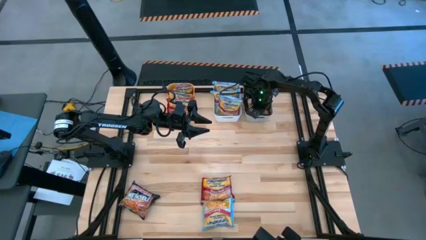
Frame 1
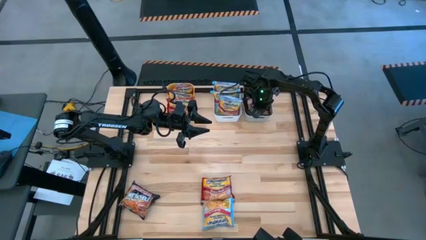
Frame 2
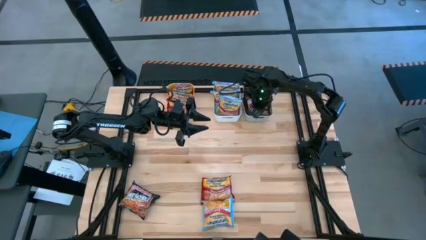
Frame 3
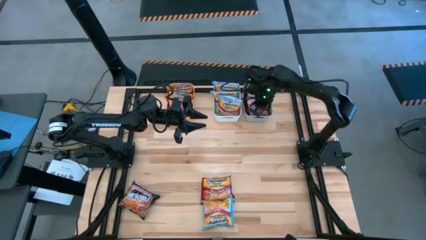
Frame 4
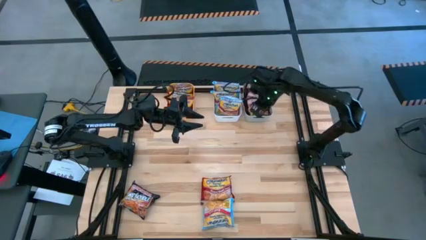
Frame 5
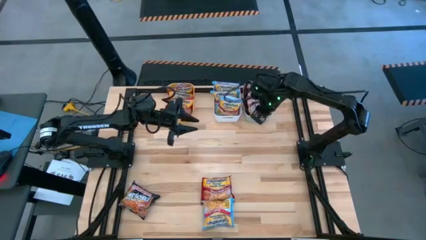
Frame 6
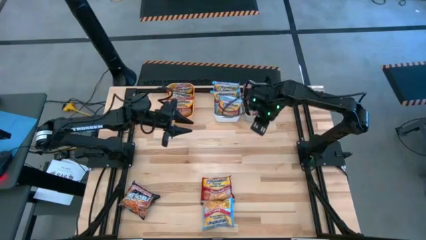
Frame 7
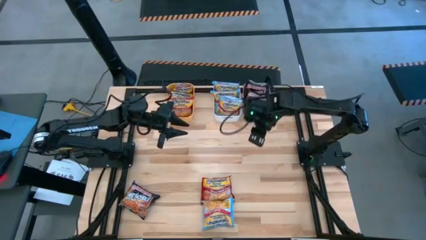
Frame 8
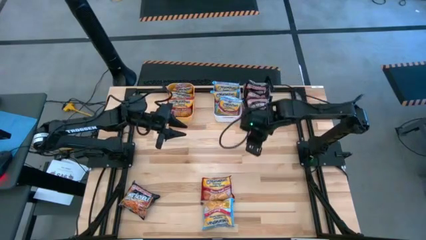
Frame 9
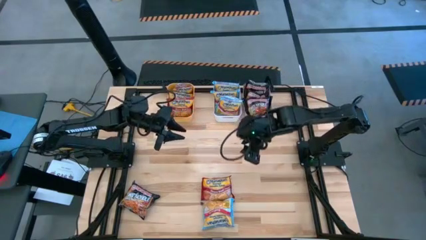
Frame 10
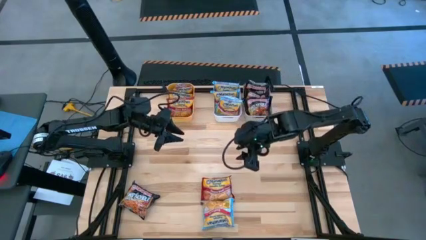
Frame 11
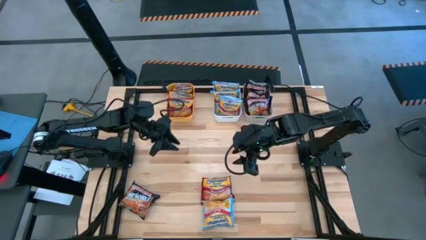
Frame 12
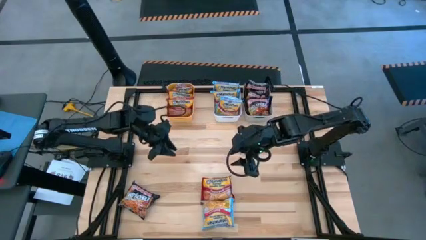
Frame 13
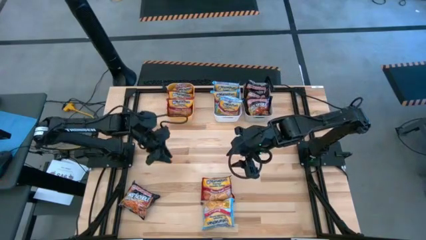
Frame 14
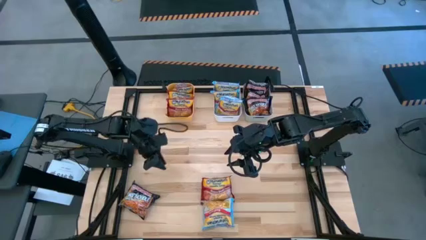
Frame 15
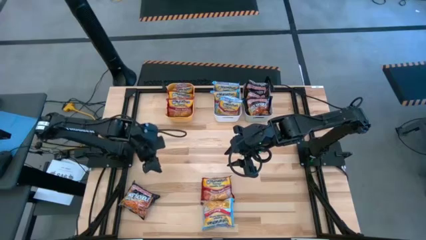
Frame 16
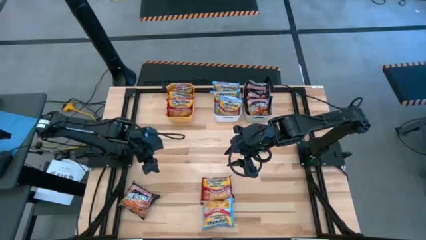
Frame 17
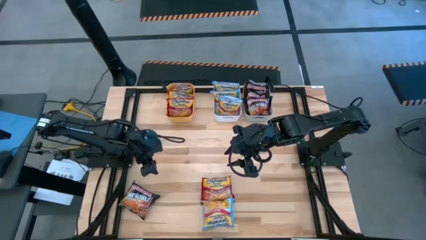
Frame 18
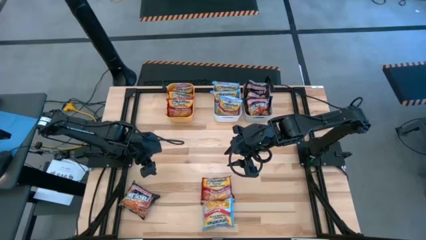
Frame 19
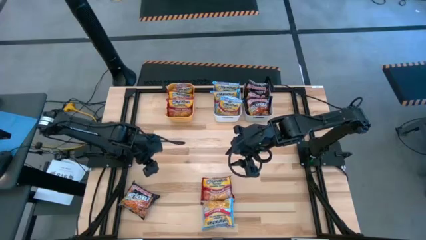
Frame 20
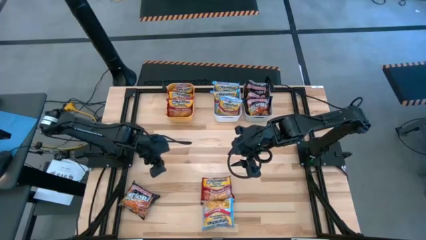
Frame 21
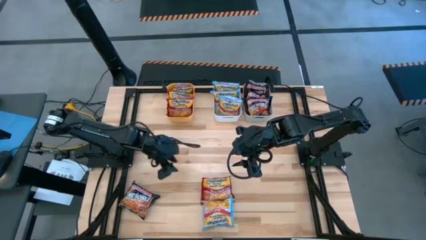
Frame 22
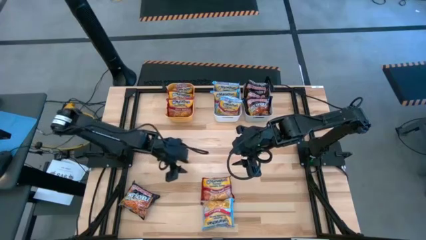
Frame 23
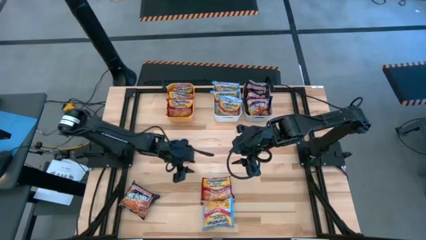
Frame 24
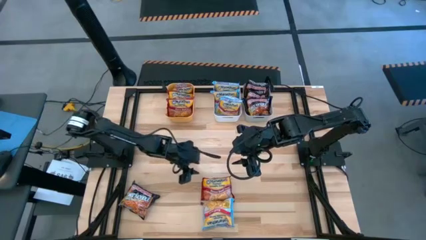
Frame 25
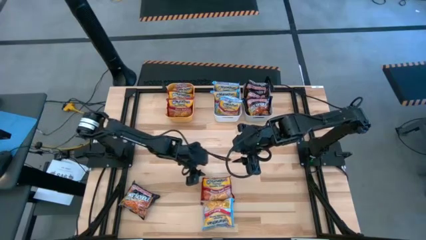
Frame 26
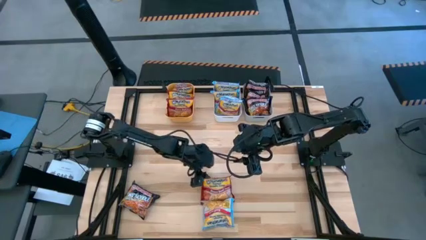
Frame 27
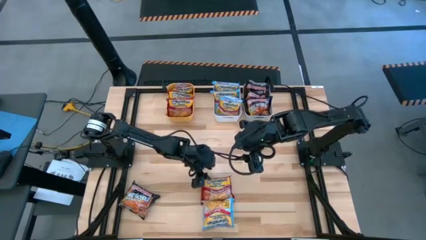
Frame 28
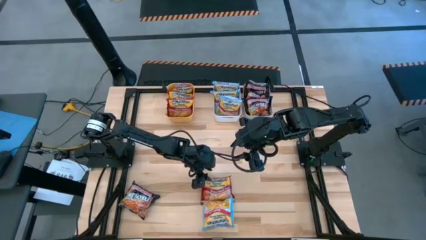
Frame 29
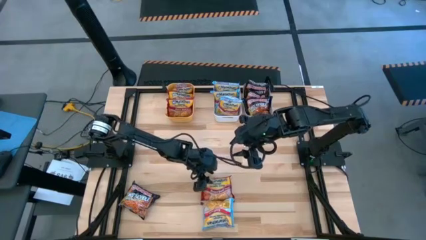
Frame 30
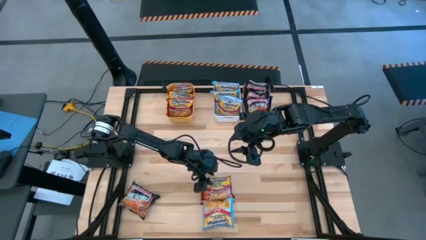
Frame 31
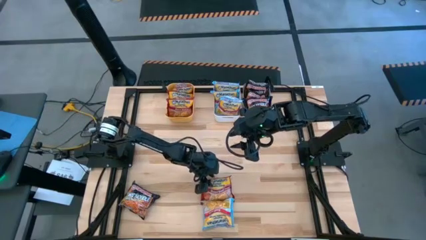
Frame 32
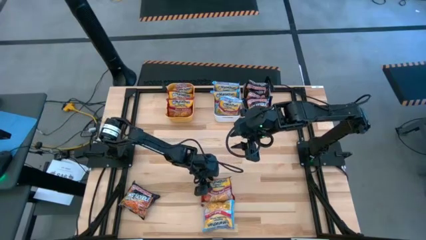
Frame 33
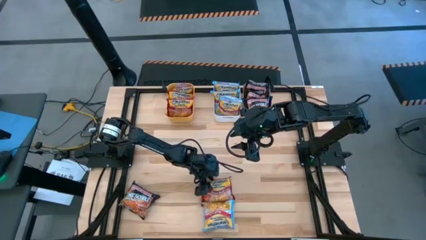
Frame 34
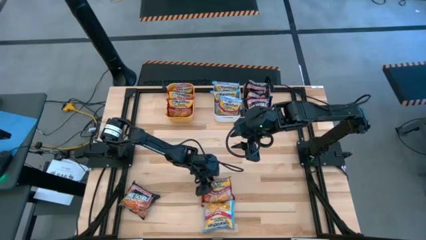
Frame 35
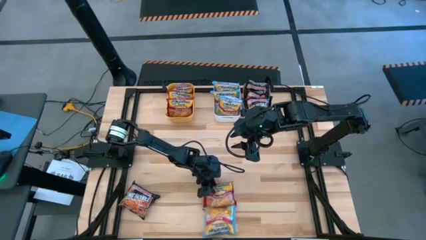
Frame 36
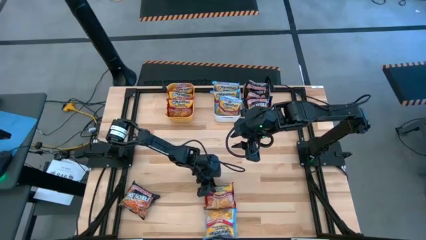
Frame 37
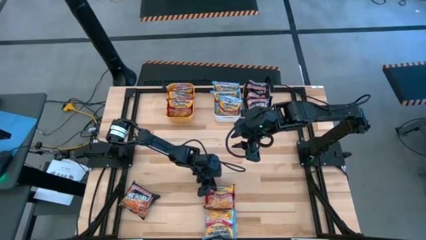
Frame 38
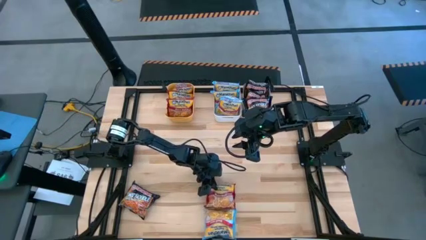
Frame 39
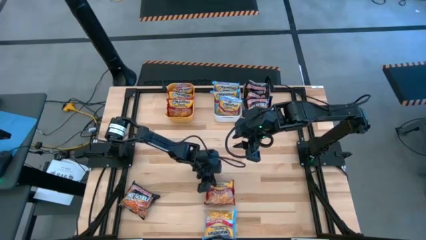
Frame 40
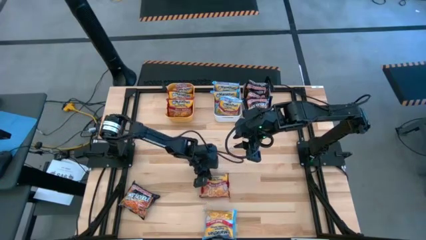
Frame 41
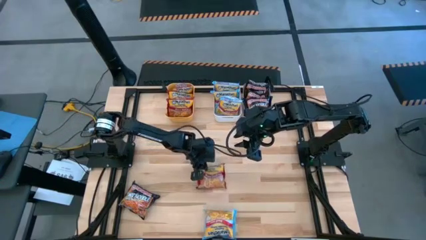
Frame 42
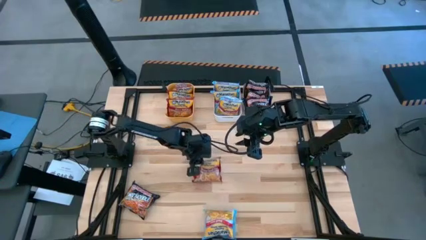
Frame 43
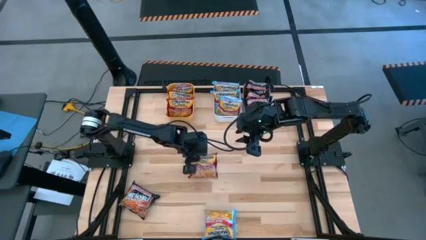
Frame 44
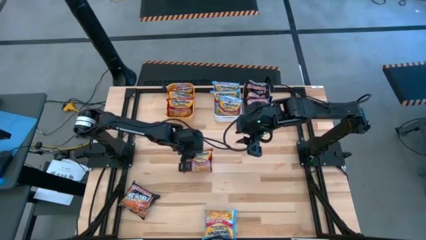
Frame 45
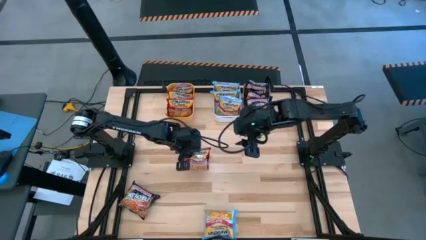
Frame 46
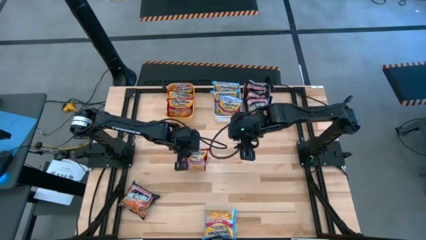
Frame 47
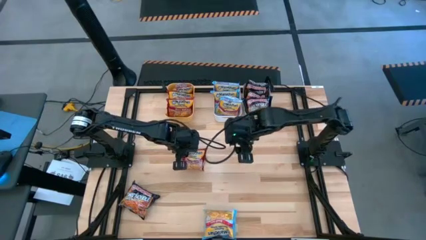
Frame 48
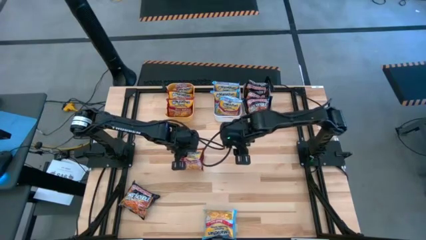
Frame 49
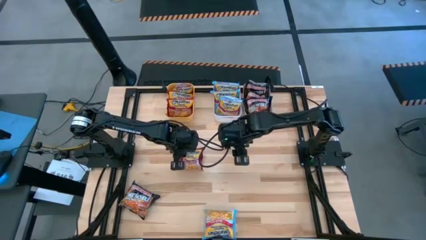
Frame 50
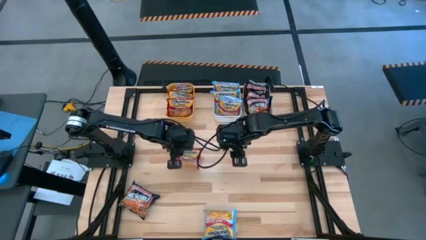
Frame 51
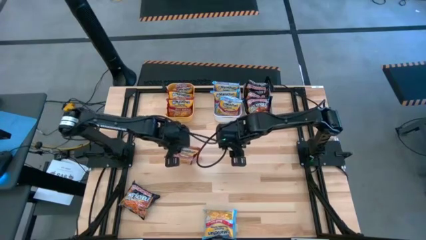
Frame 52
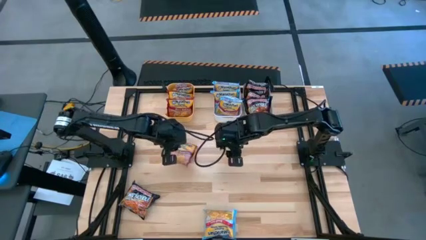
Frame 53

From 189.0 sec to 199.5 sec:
Task: Sort Maruchan noodles
Put the red noodle pack into the yellow bin

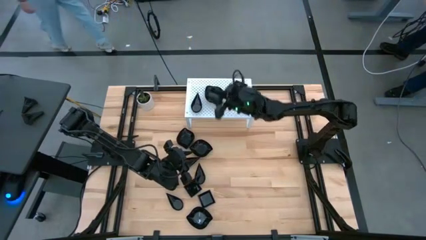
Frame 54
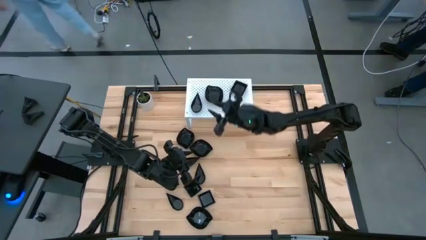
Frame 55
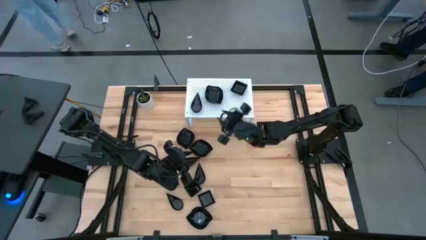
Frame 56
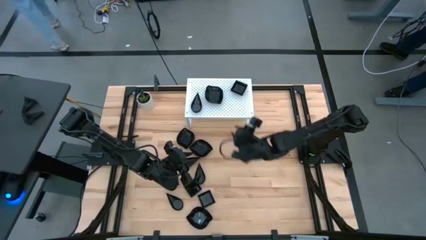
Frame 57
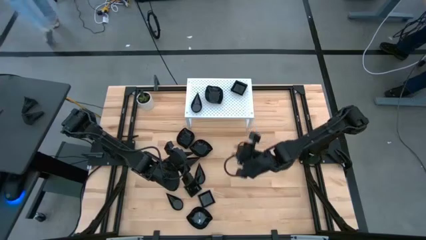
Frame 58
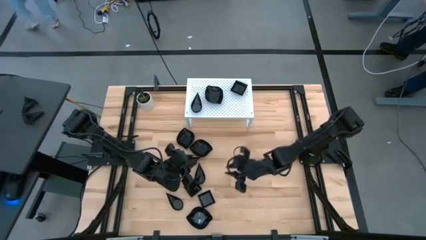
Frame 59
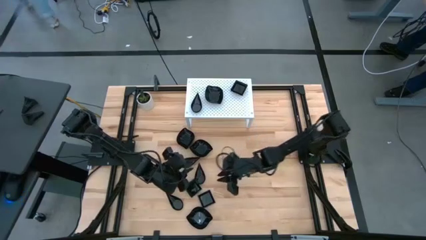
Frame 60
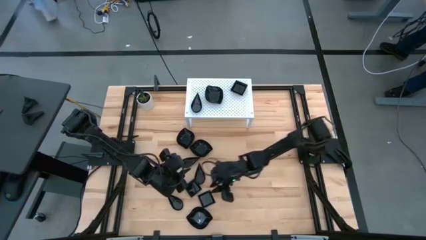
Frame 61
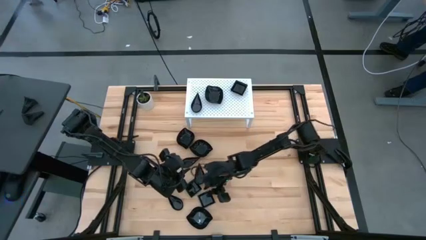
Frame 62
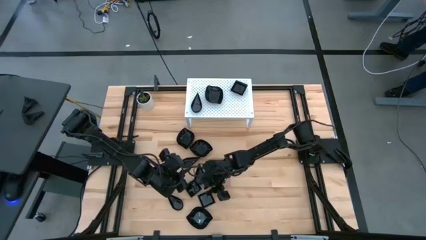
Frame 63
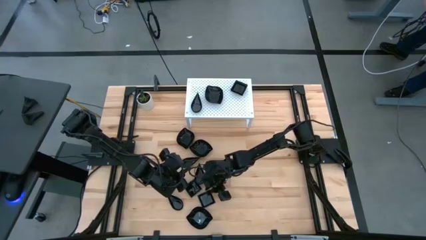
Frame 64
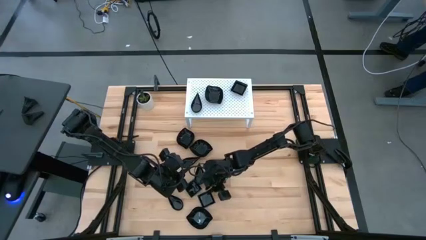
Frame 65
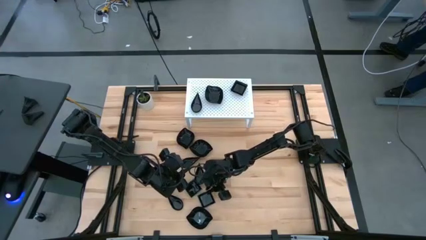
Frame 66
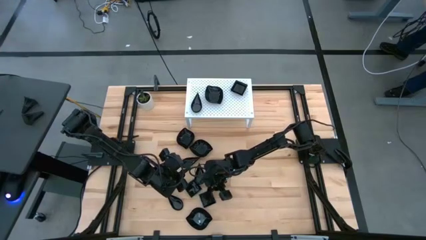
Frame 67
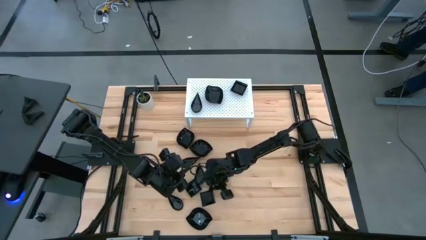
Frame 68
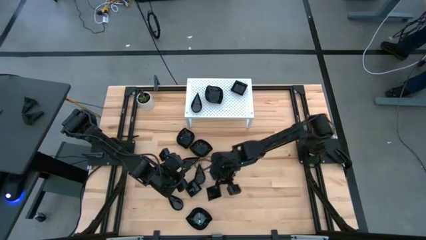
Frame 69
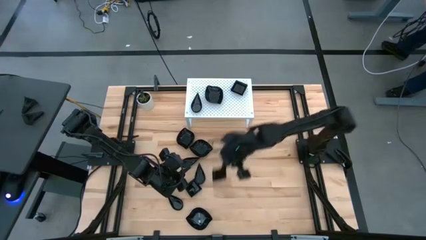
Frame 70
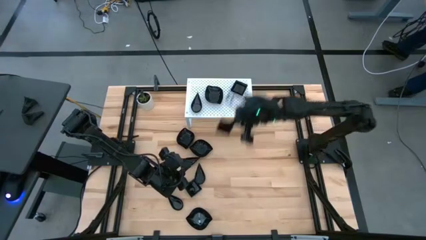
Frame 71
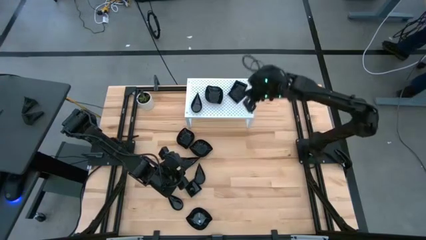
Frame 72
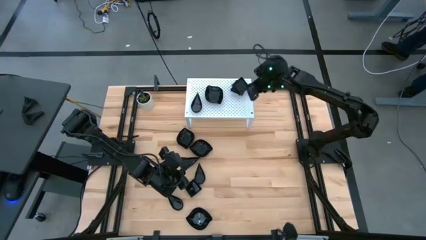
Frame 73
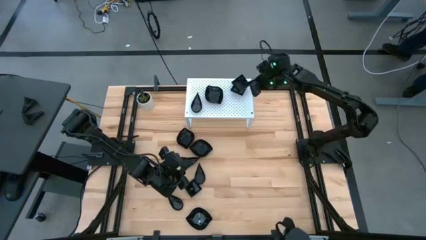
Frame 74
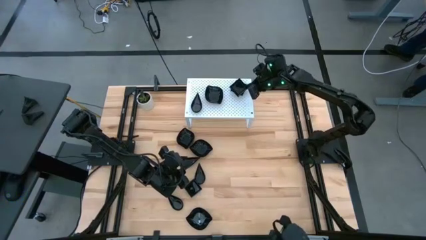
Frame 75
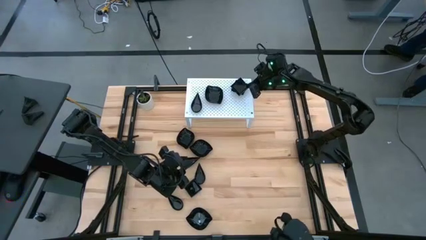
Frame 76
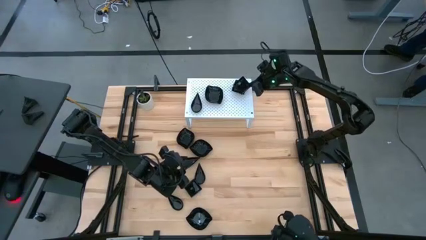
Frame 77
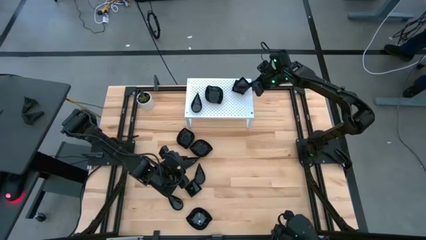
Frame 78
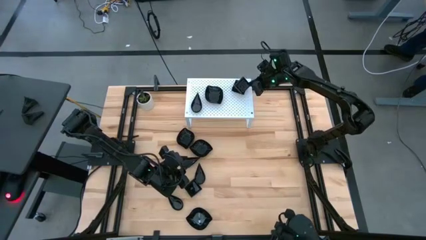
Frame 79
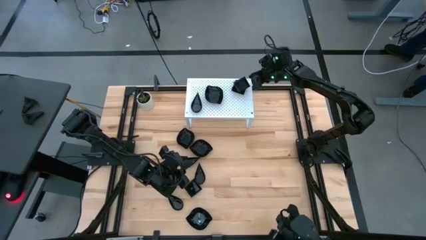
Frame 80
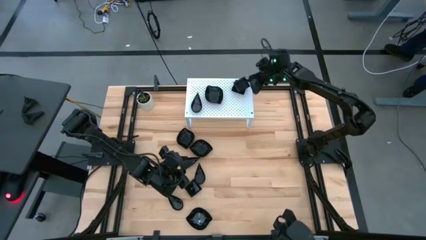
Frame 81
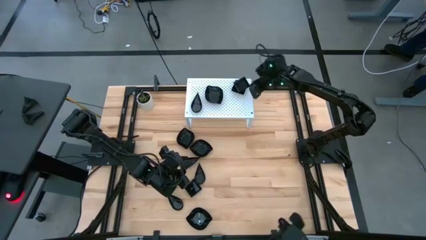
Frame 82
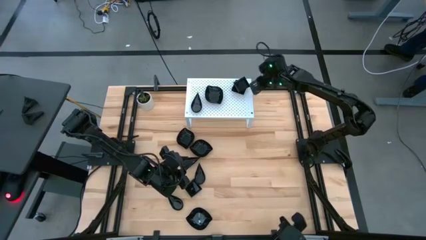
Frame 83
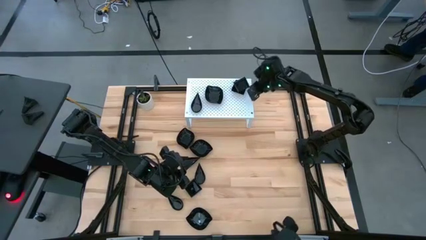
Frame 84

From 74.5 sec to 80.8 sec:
Task: Pick & Place Mini shaped plates
Stack the black square plate on top of the other black square plate on the shelf
